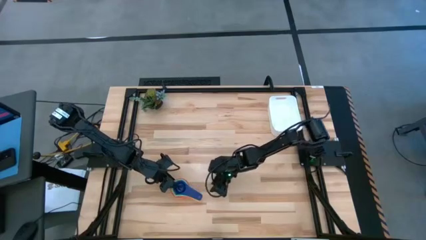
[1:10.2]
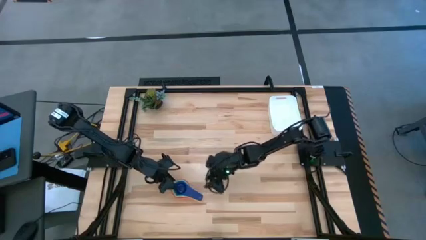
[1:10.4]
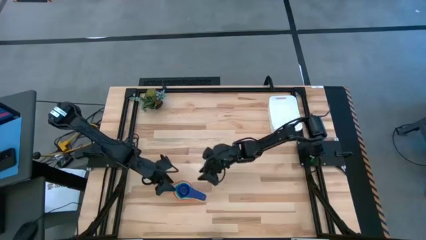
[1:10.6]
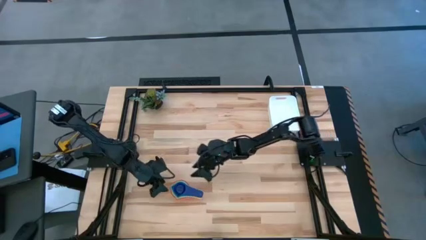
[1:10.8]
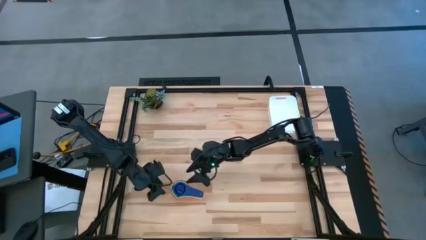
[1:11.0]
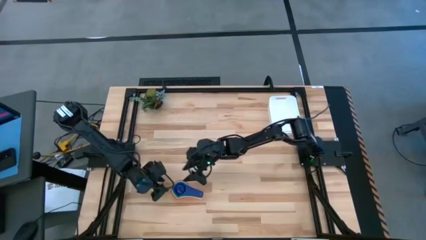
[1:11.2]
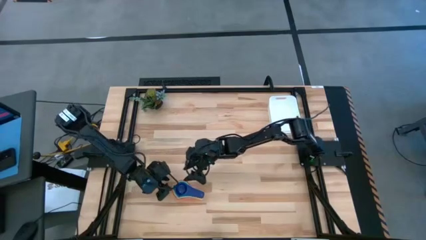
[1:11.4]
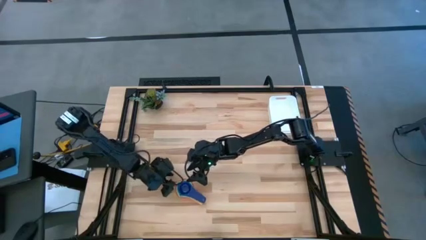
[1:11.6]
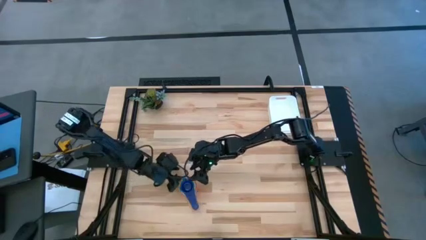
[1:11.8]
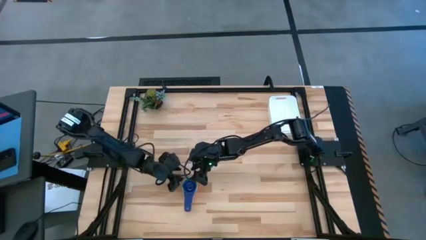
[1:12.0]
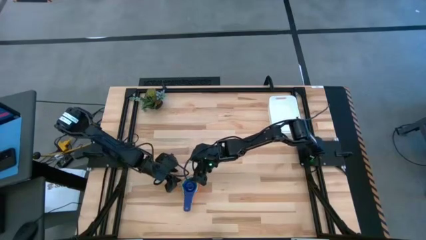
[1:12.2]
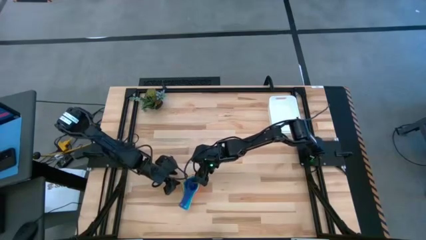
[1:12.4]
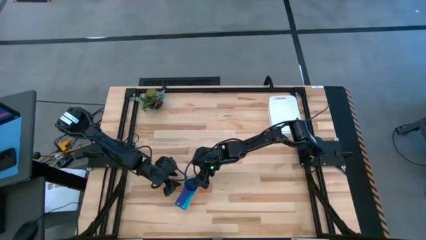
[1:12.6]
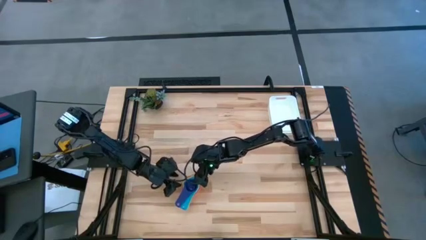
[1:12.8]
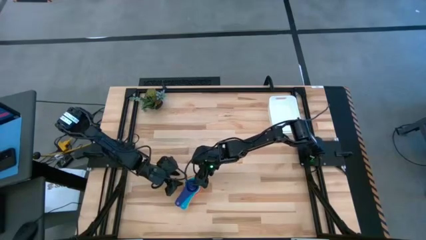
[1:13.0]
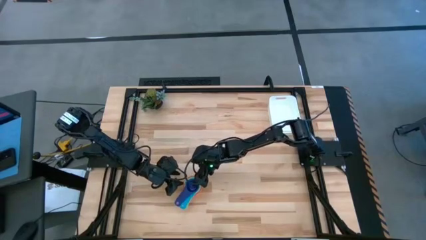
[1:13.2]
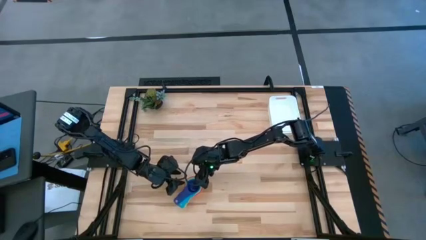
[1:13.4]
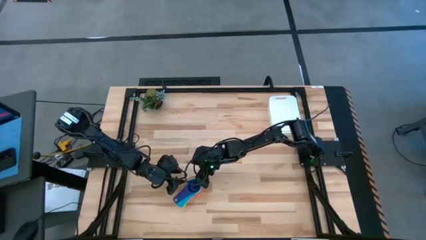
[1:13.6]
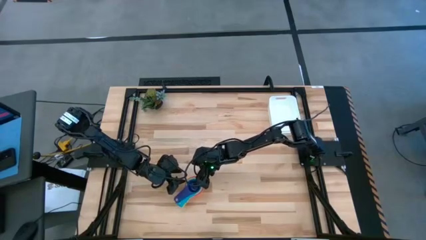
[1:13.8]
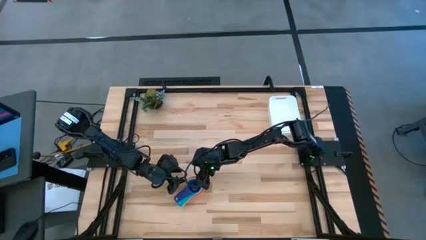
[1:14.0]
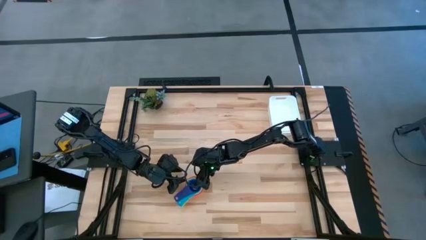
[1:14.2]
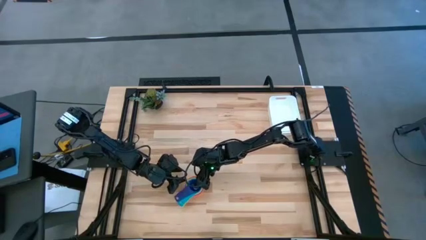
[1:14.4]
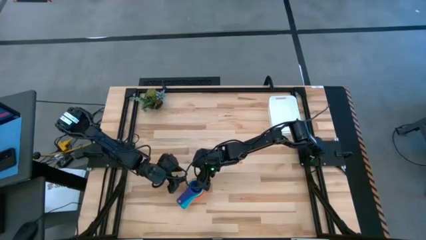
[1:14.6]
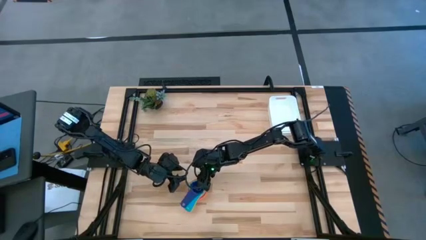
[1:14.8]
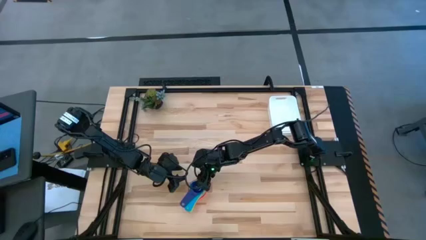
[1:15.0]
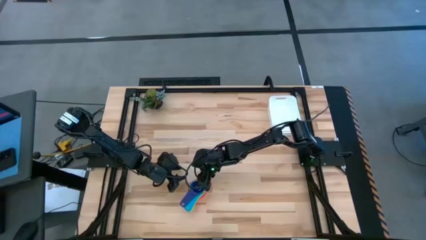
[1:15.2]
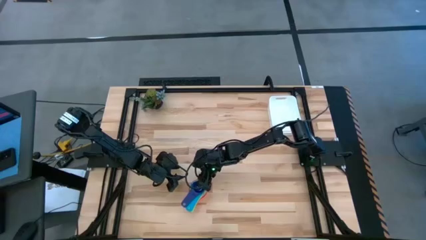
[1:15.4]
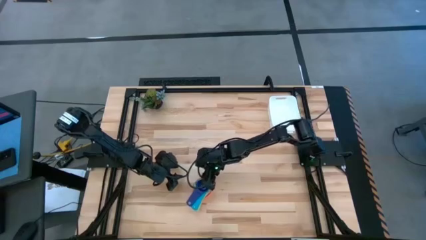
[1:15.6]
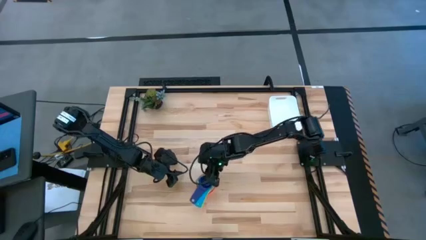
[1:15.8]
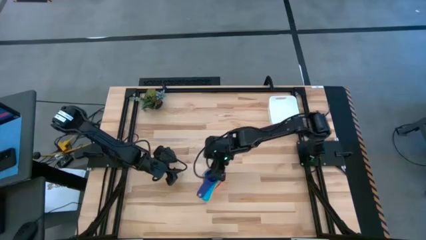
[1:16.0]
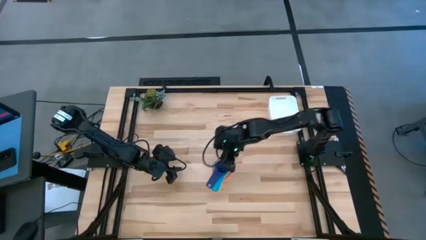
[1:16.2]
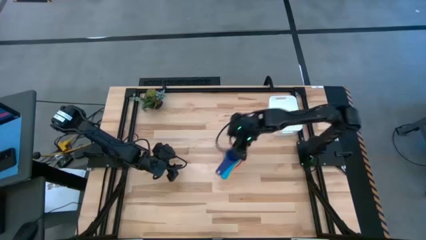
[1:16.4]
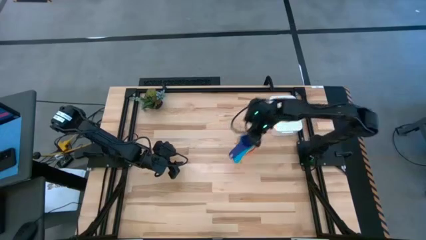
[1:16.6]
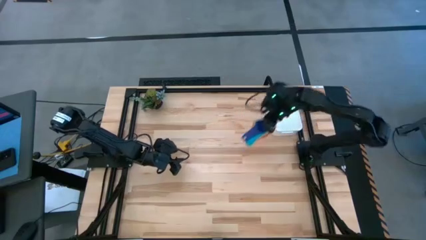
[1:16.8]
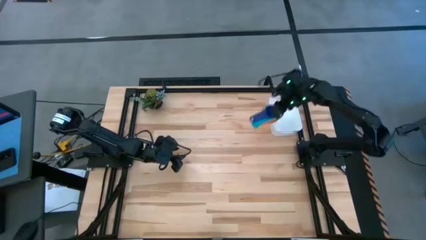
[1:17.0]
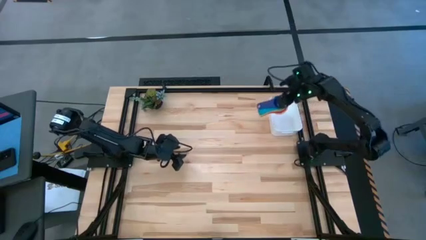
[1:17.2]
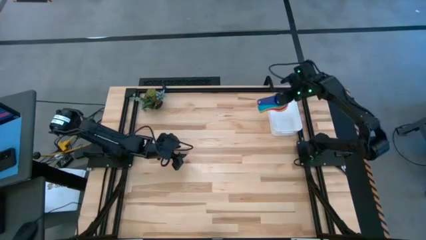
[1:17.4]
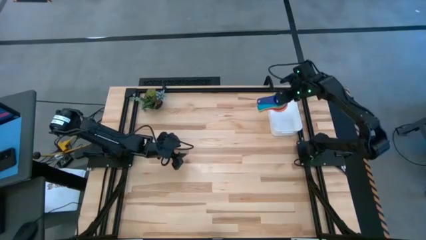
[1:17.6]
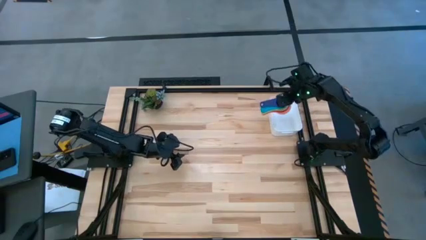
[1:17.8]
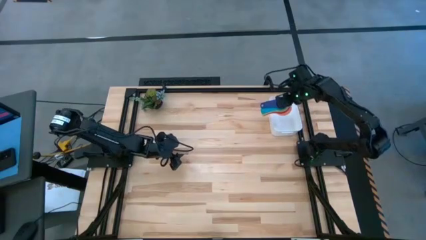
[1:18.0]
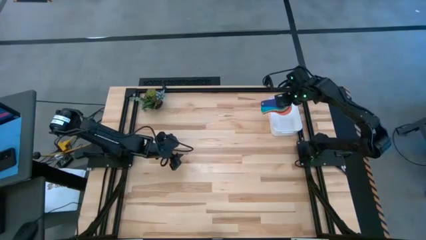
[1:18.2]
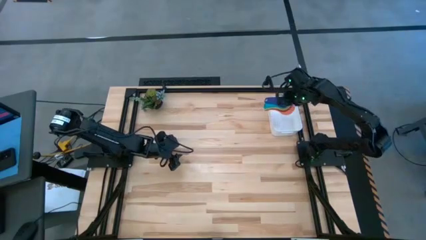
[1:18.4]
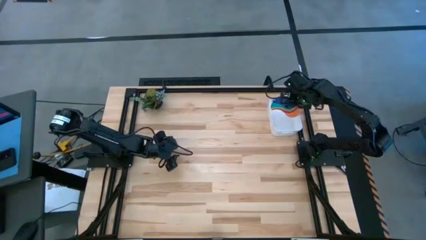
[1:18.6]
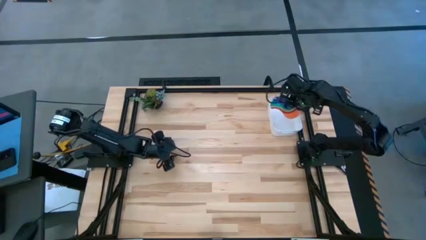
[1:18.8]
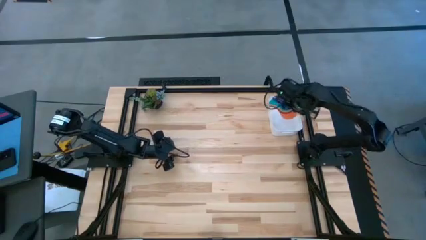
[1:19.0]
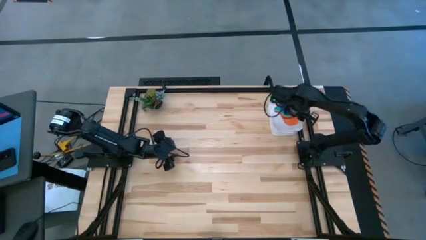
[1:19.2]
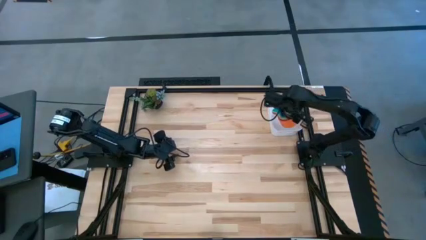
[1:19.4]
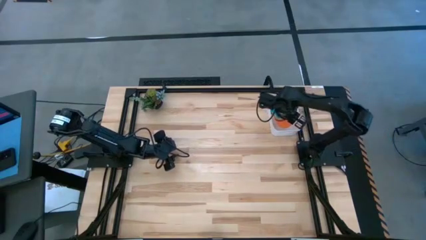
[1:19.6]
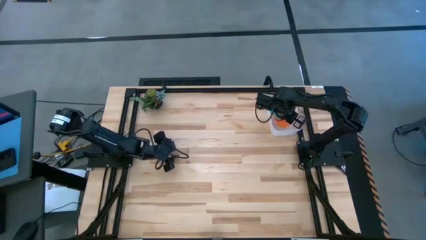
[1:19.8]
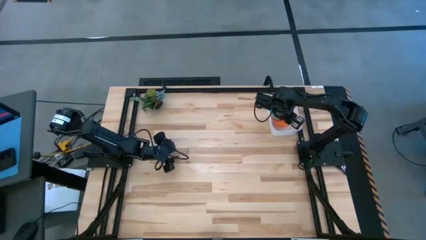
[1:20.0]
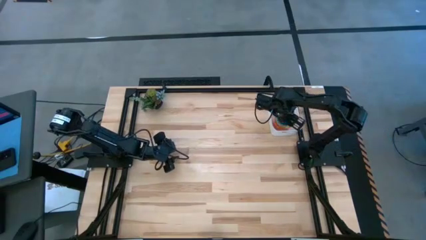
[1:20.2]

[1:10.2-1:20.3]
Task: Nest measuring cups in basket
Put the nested measuring cups into the white bin

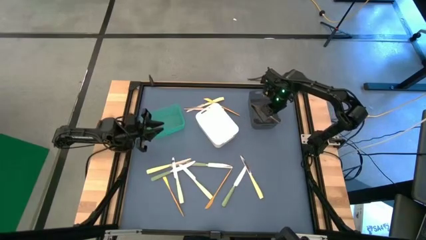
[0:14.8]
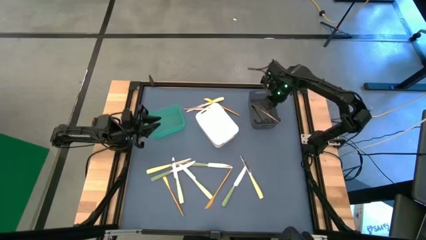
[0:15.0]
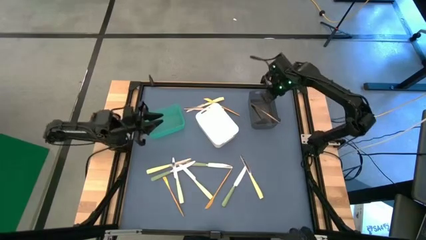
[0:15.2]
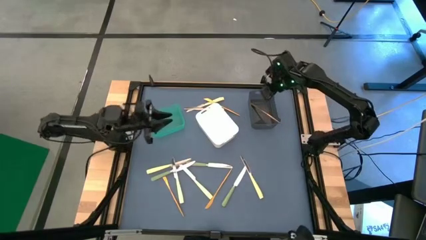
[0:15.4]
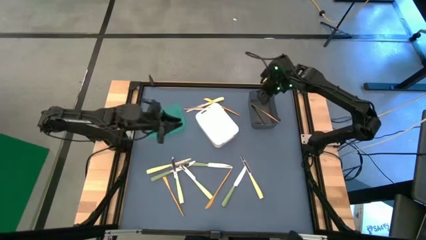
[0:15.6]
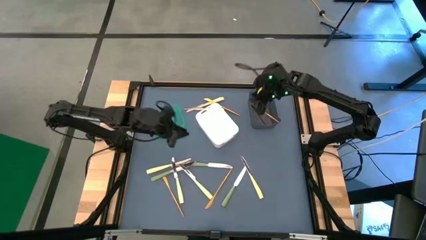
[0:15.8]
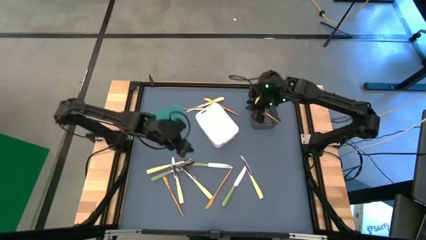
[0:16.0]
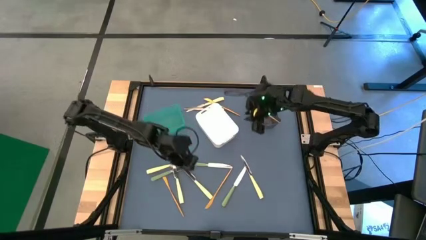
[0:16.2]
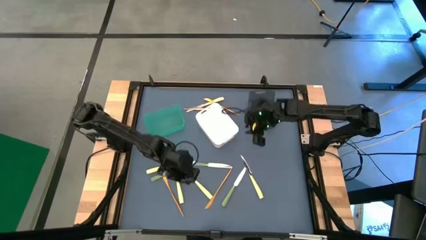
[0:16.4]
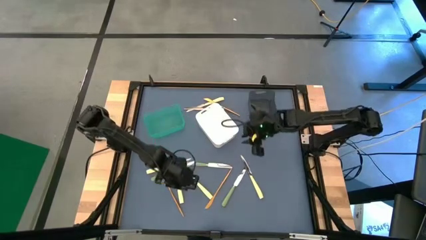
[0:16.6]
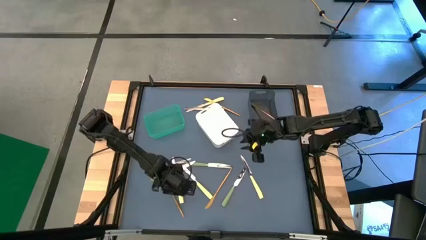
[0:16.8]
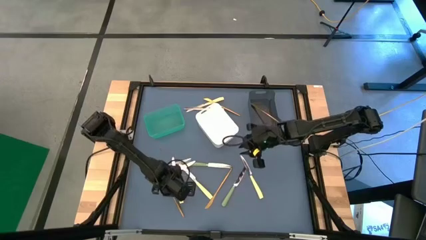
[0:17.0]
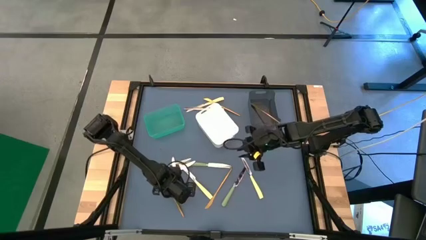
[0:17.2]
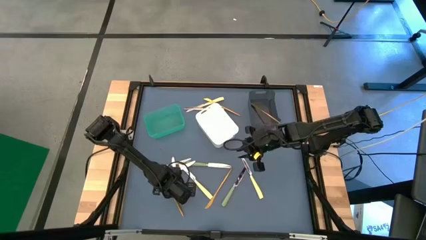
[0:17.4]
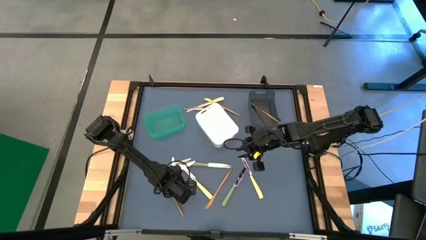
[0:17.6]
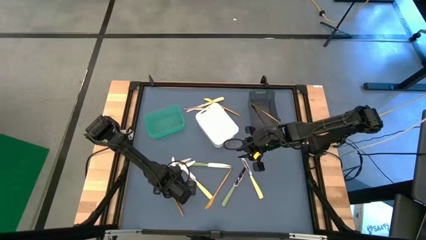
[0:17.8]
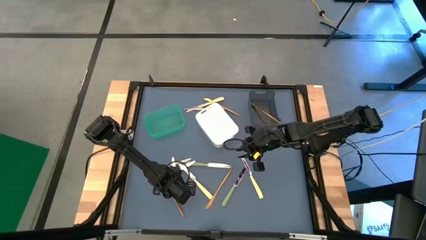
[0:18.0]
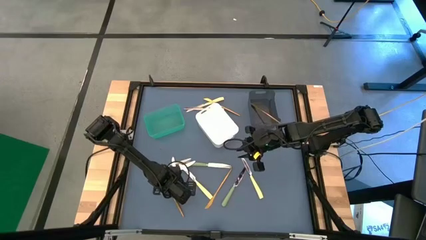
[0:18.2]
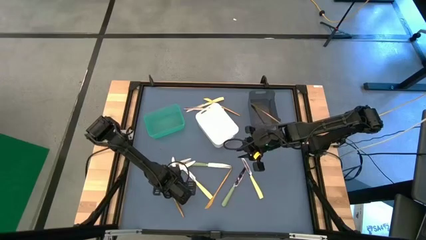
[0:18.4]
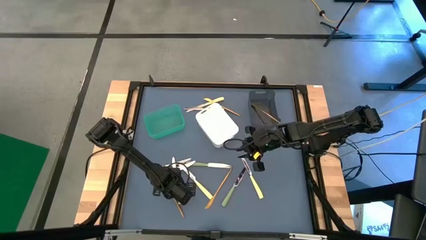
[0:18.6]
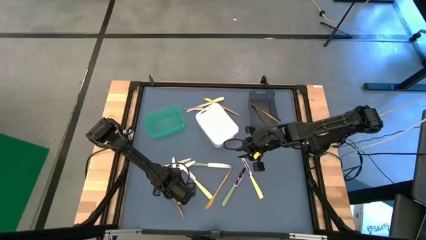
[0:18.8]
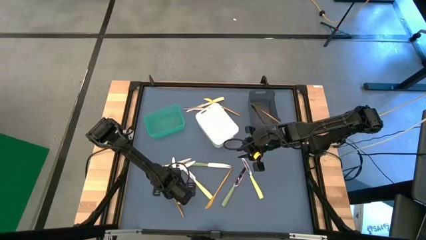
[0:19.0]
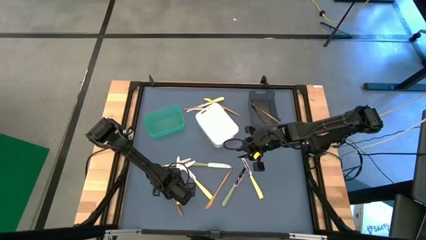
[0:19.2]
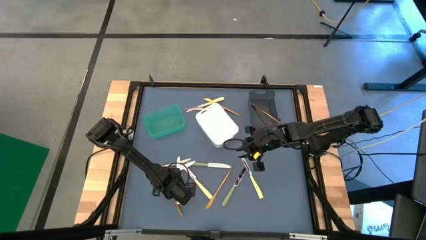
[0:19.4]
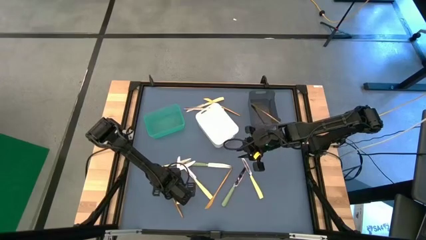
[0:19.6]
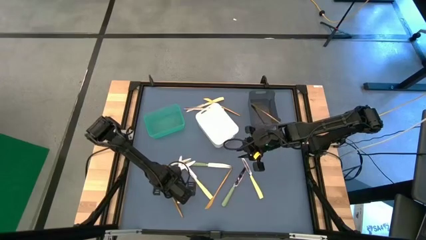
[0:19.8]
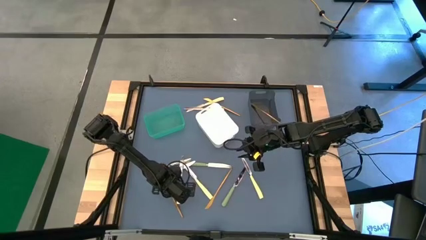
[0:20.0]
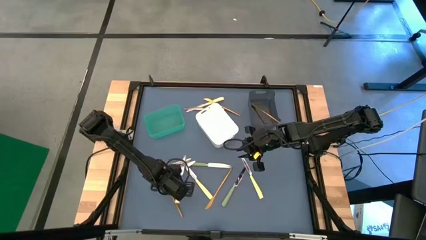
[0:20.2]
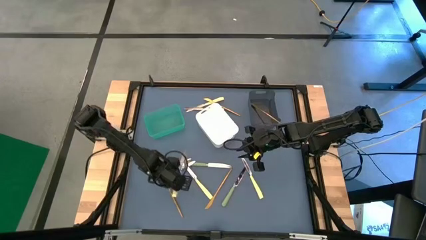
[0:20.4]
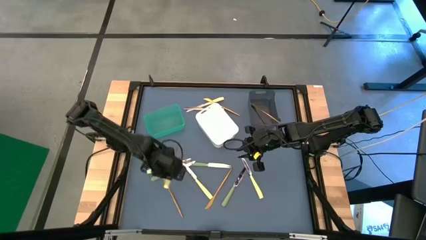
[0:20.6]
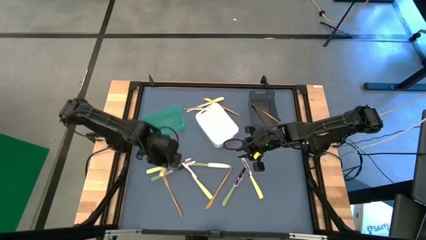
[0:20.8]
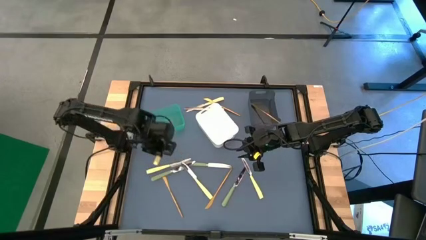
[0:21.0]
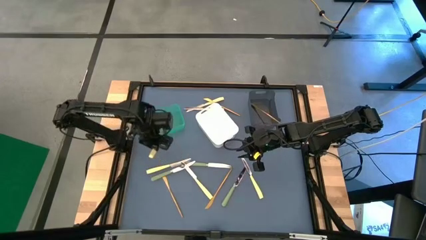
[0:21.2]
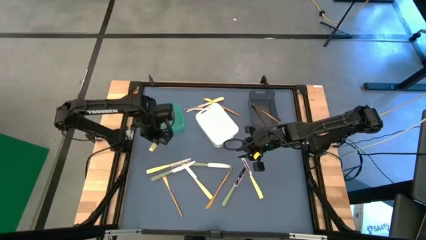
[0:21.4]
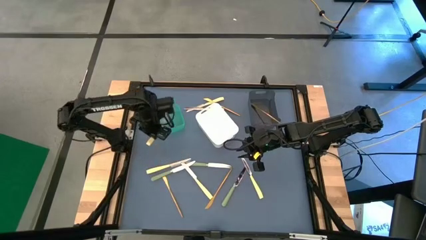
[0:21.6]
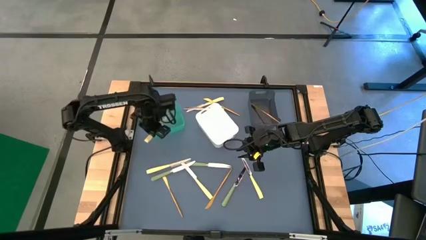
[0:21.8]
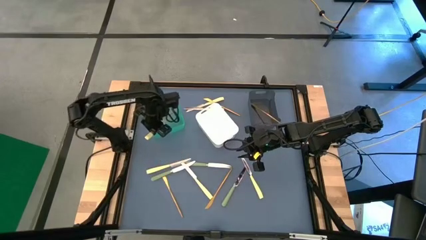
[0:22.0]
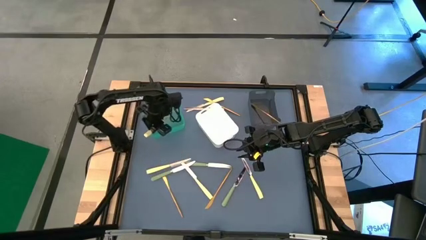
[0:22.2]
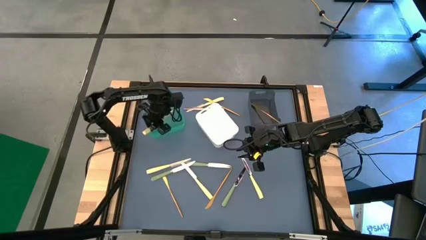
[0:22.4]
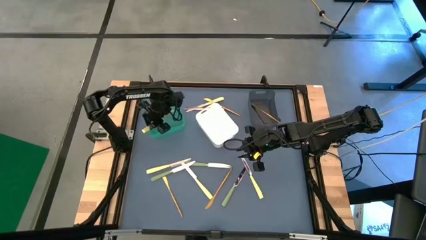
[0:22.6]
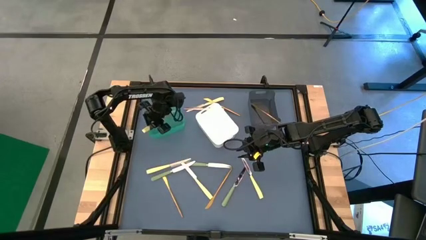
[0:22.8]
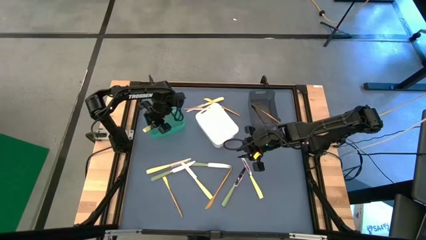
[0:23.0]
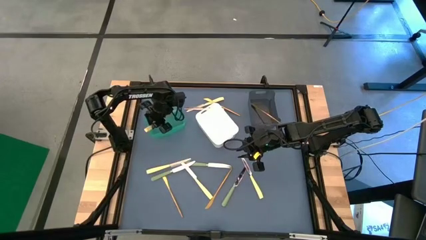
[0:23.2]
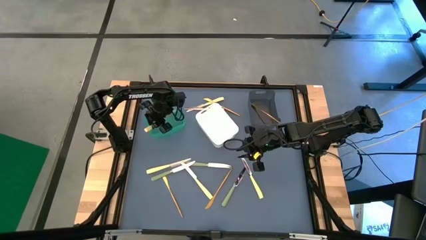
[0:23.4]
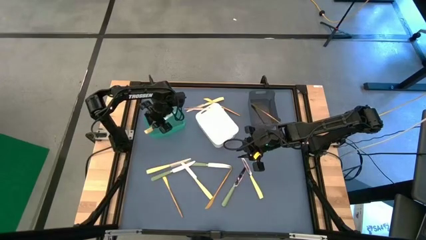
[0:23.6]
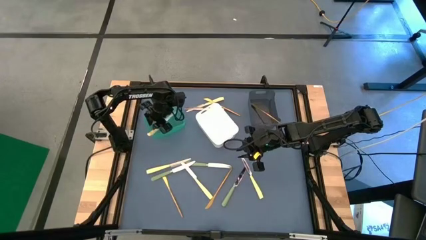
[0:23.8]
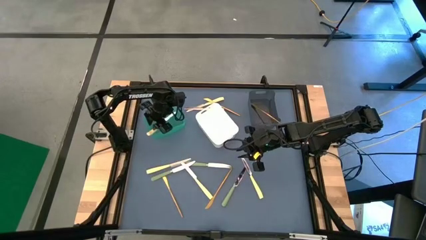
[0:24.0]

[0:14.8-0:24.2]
Task: Sort silverware by color (type)
Put the bottom left yellow table knife into the green bin
